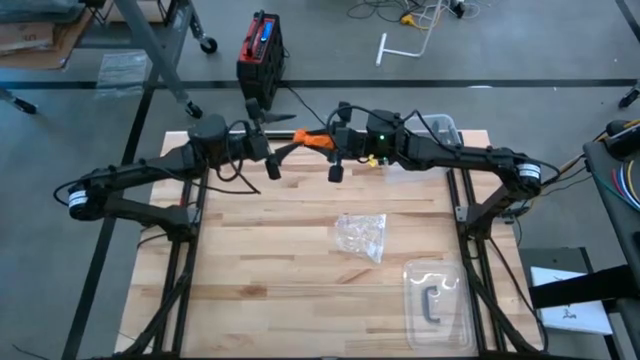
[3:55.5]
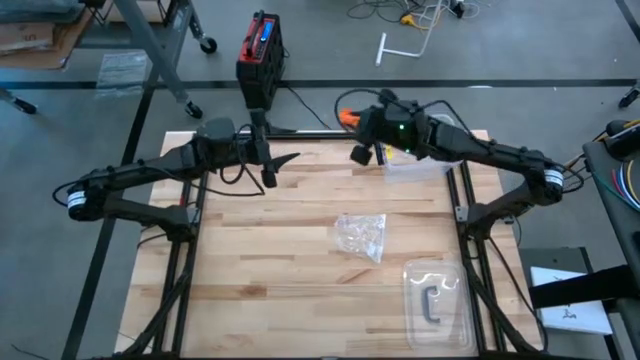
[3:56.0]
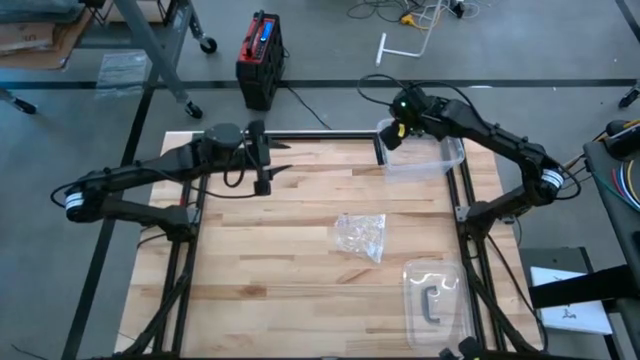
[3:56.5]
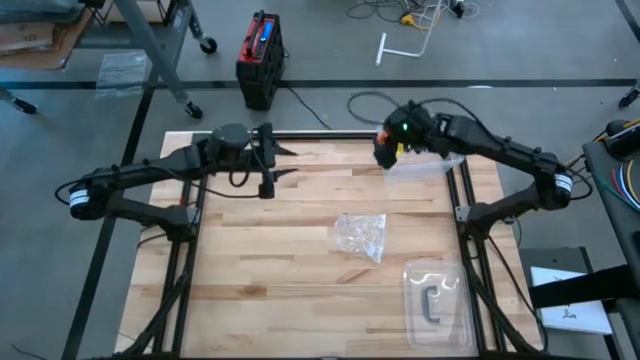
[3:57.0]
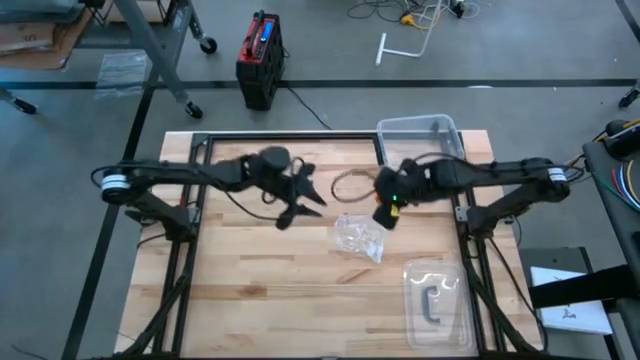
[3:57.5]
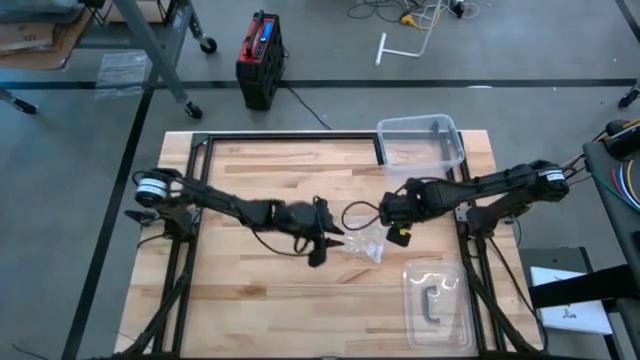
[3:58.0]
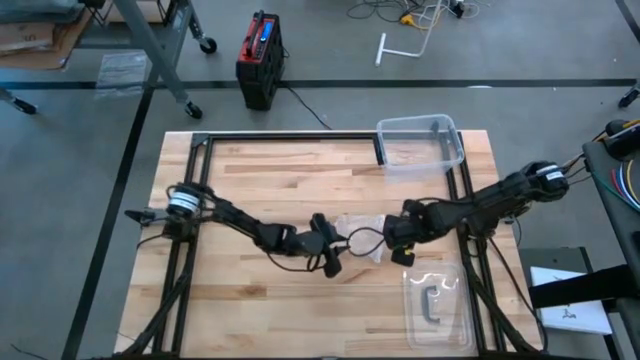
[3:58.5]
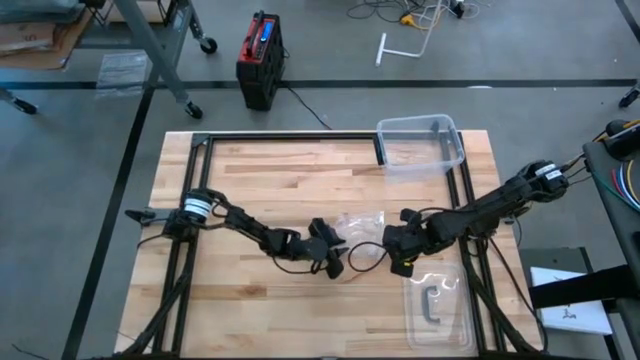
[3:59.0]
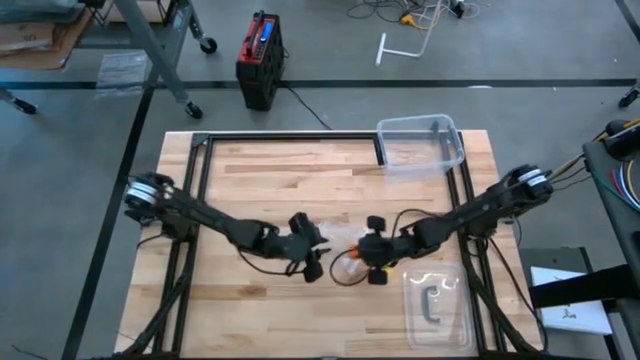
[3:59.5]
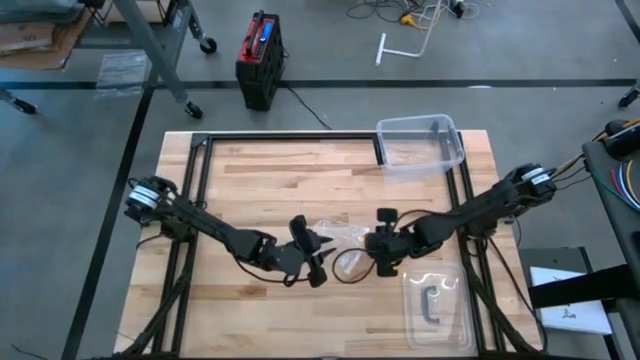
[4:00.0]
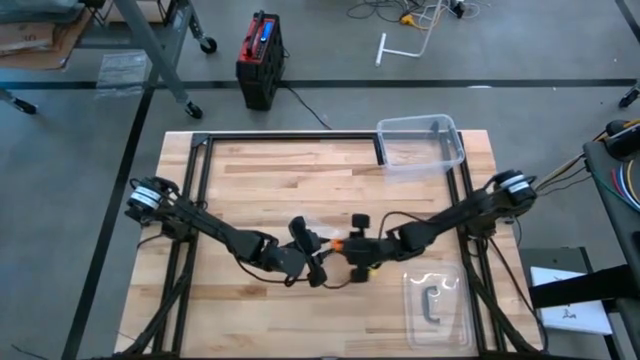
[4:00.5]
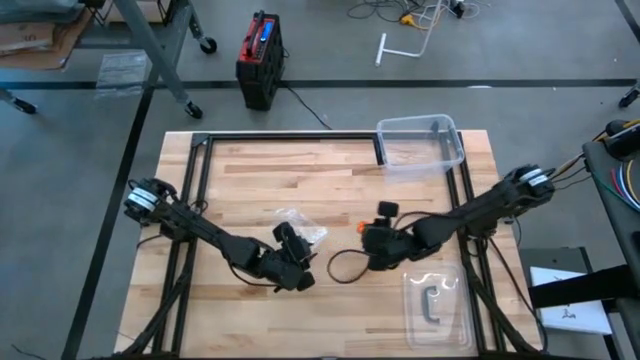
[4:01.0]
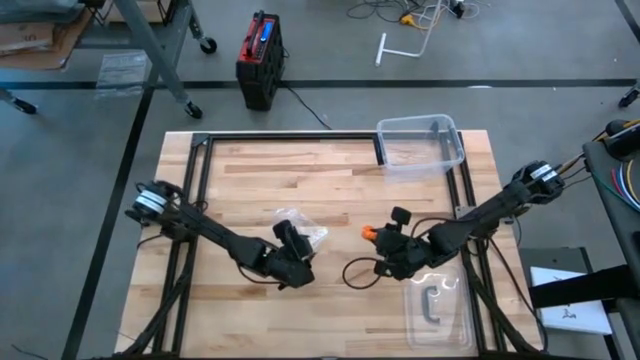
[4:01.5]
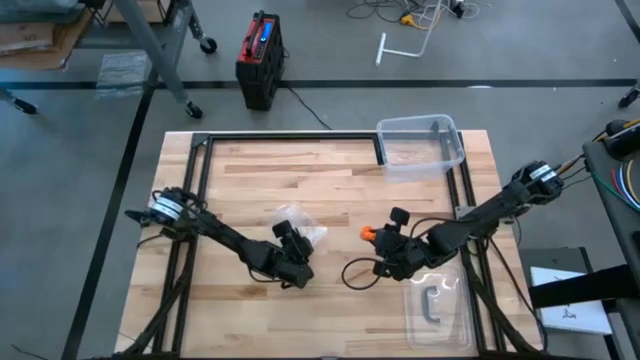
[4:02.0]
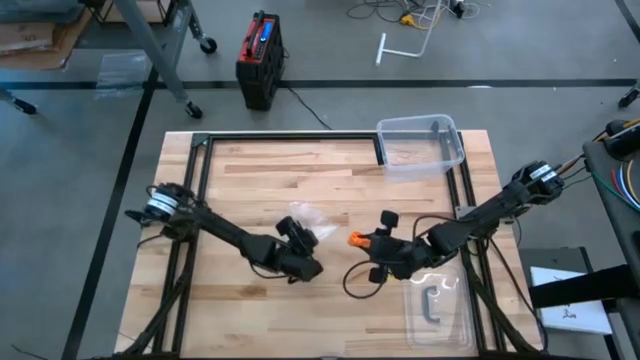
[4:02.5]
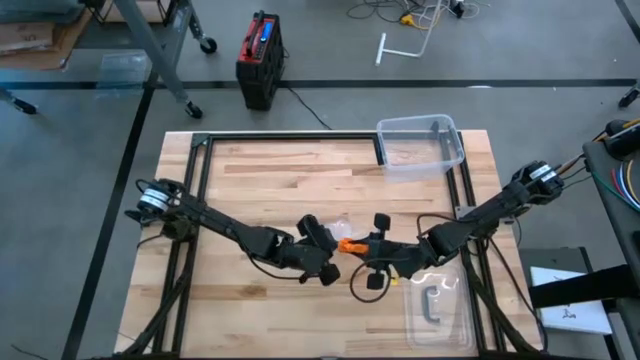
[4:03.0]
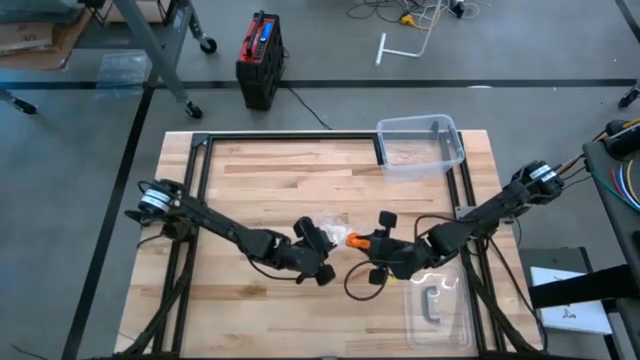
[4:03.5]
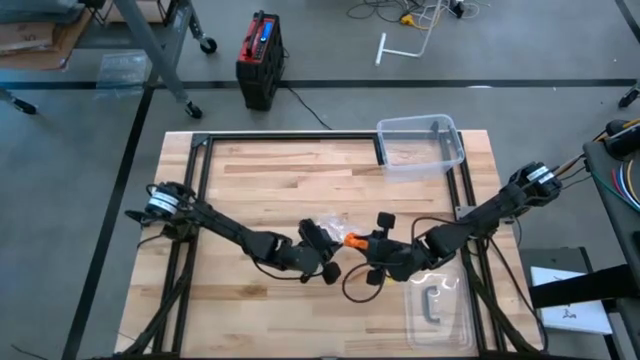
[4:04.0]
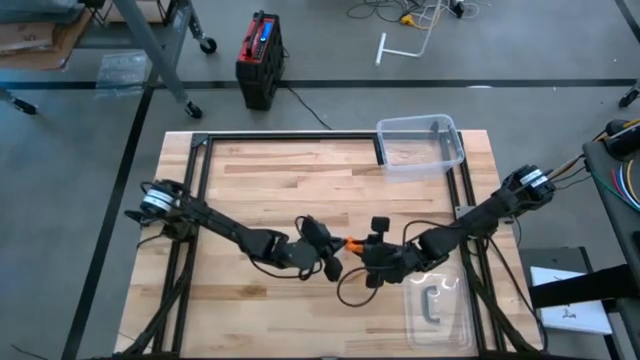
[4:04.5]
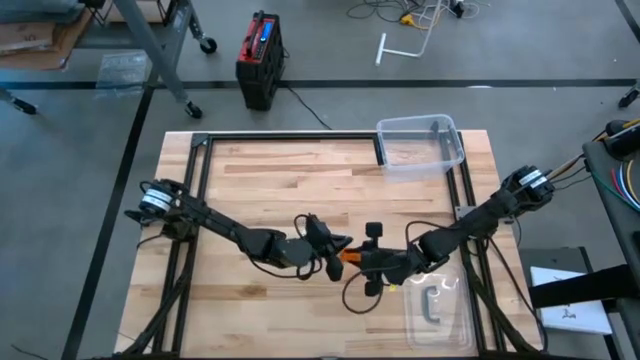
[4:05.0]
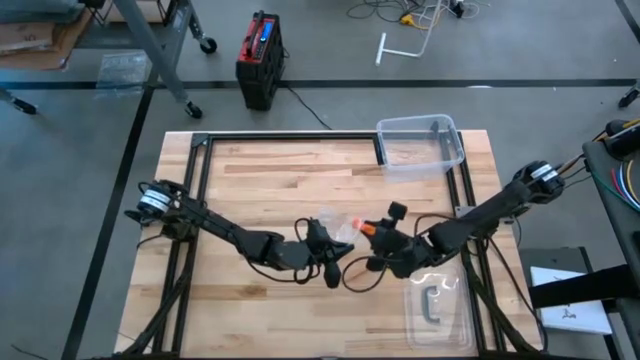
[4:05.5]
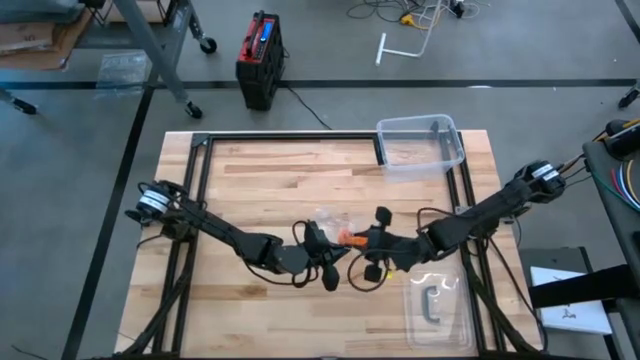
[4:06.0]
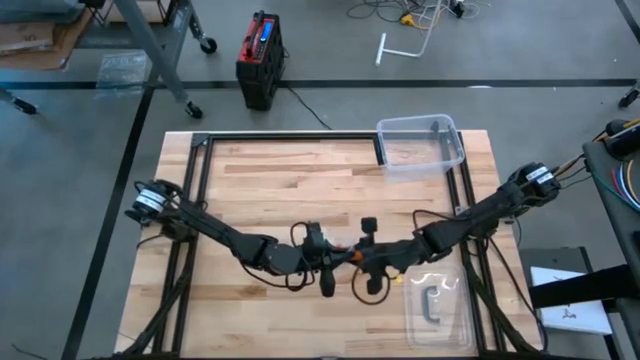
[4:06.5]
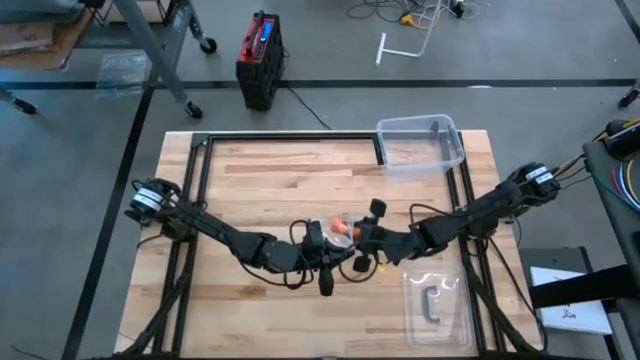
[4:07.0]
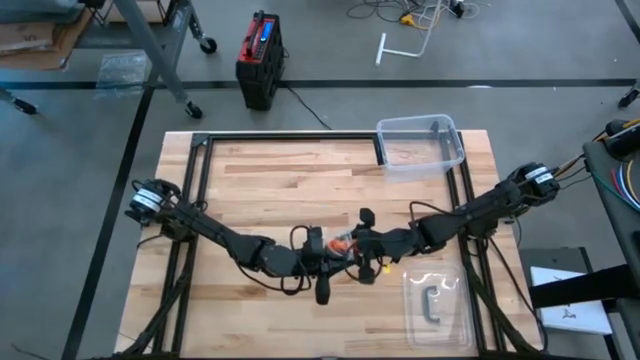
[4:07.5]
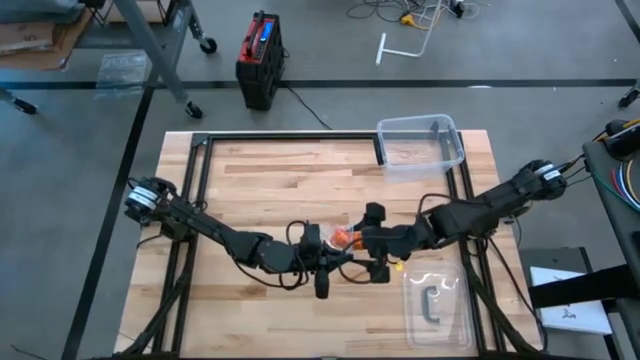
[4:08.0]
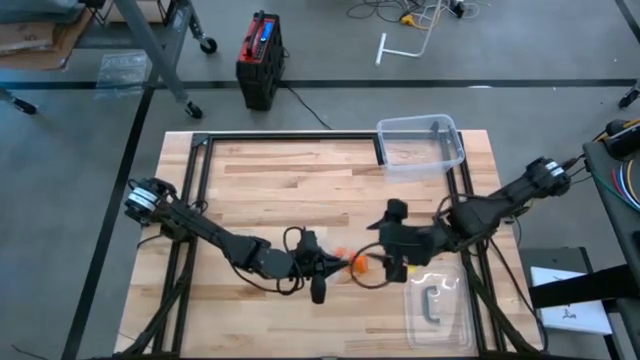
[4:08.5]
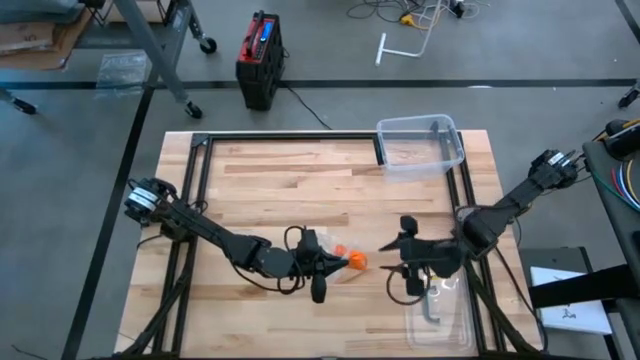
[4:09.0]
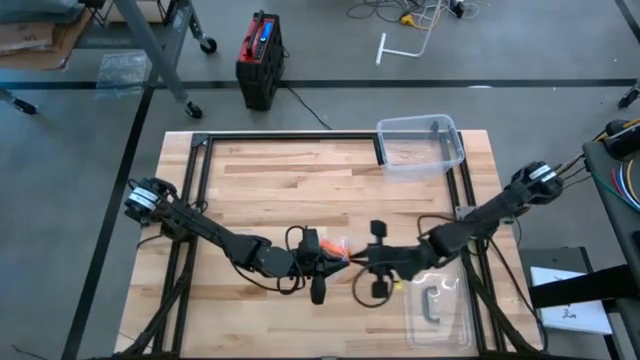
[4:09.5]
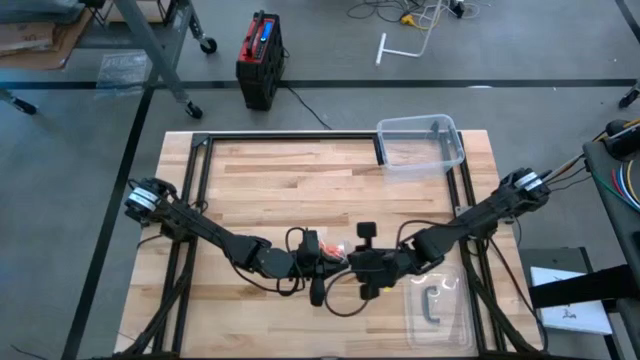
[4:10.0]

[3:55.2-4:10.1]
Task: Roll bandage
Put the rolled orange bandage into the zip bag

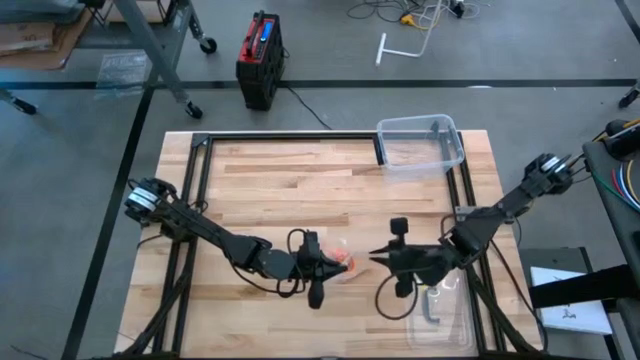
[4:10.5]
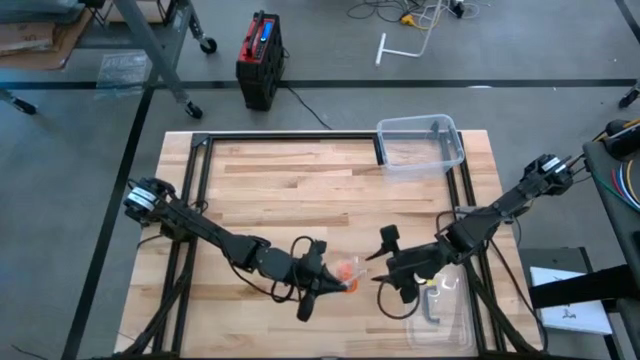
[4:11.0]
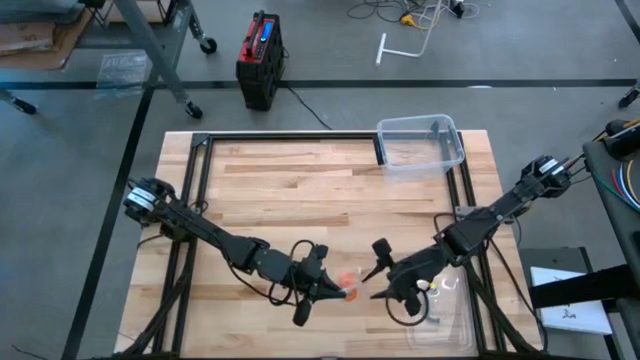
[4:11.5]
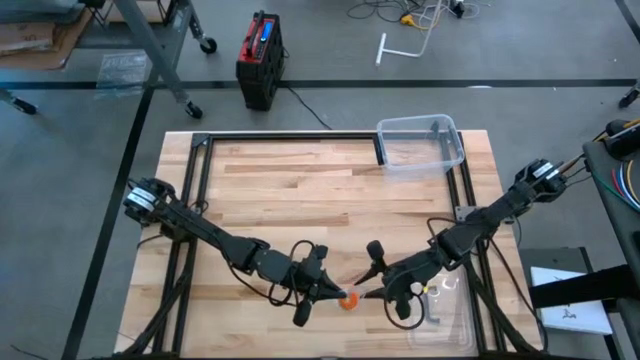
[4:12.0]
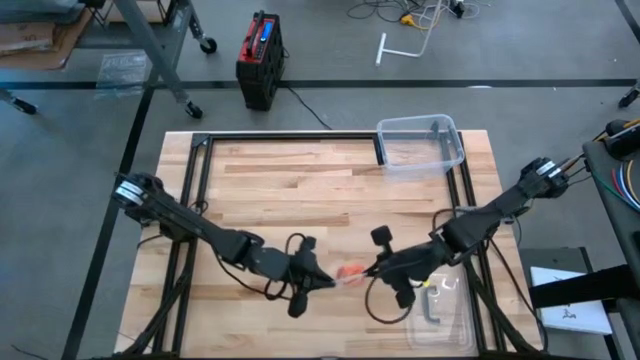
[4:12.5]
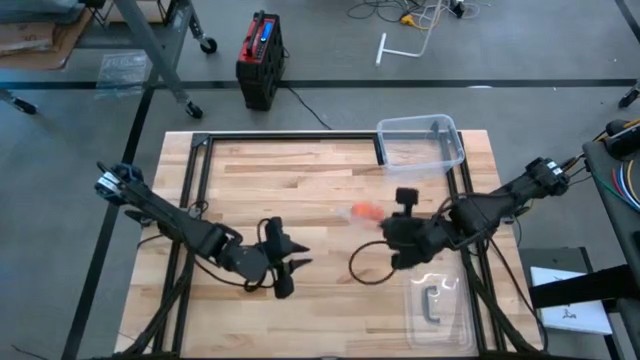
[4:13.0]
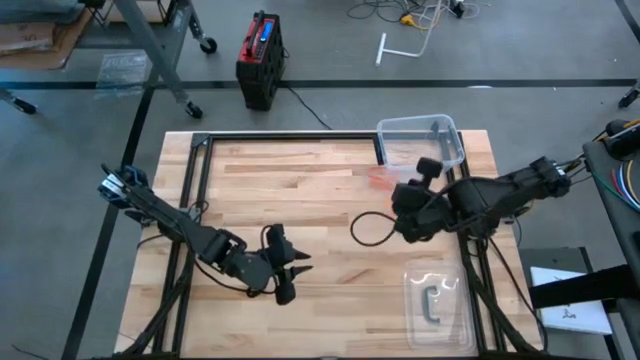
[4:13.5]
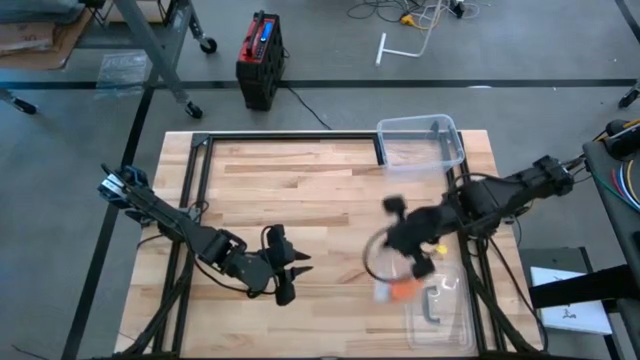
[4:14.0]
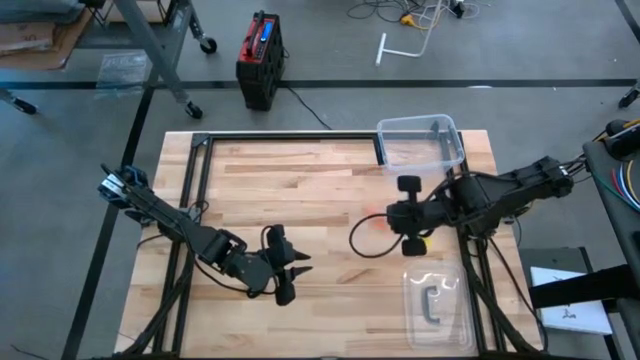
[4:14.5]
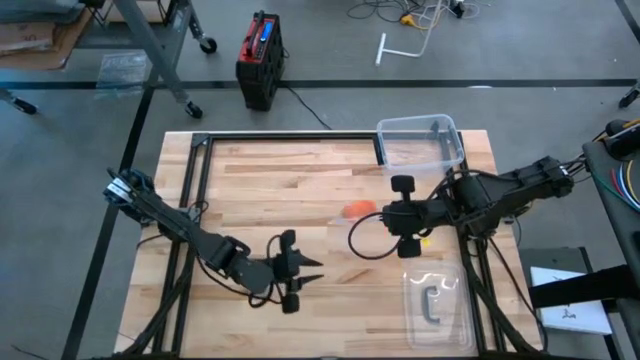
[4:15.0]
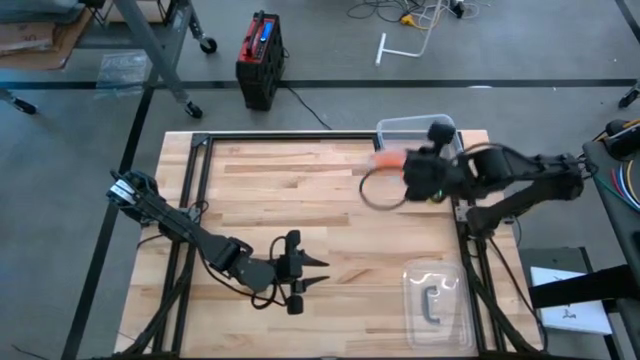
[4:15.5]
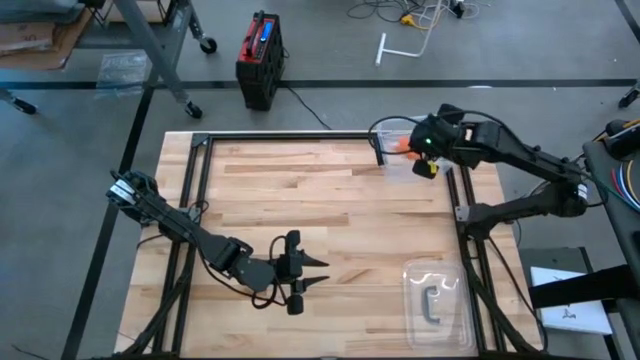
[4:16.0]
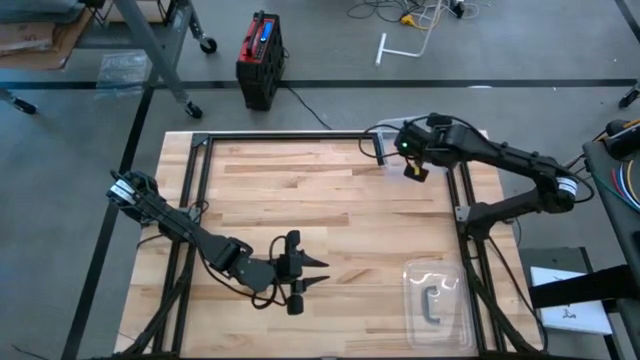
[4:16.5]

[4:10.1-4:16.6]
Put the transparent zip bag into the transparent bin
